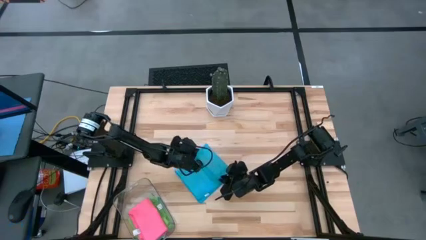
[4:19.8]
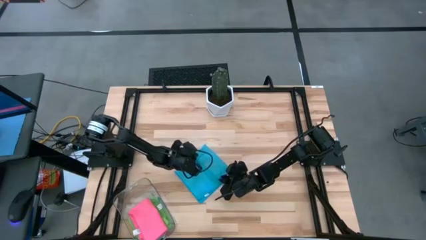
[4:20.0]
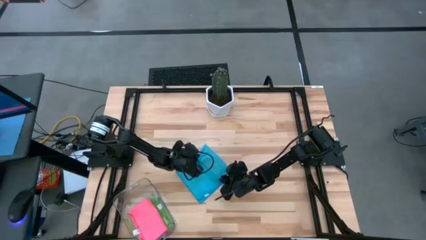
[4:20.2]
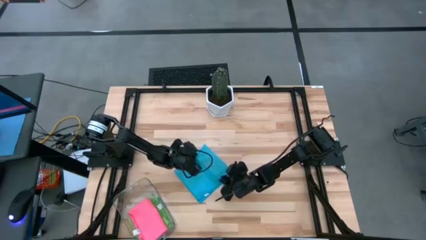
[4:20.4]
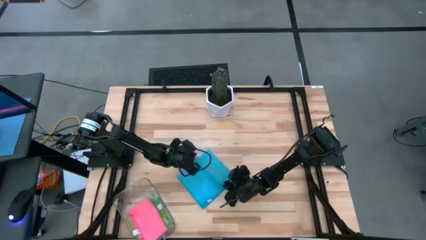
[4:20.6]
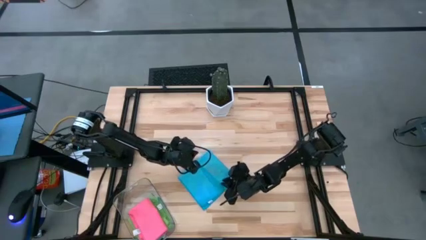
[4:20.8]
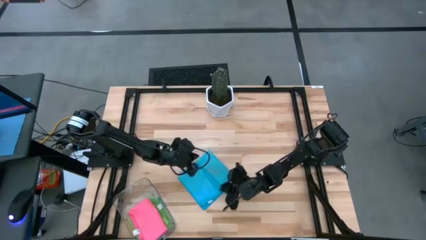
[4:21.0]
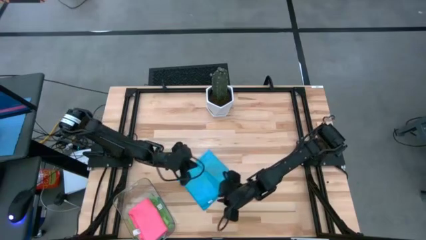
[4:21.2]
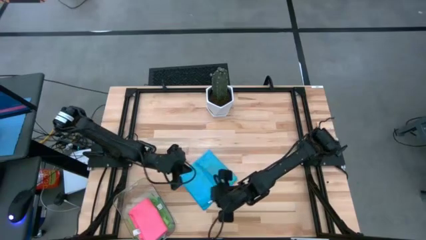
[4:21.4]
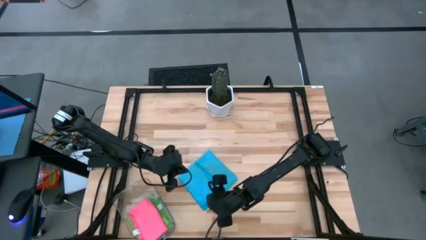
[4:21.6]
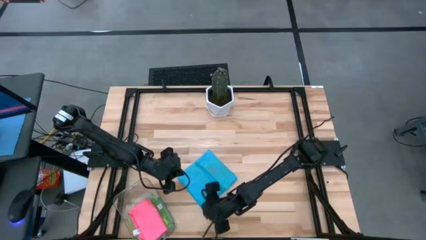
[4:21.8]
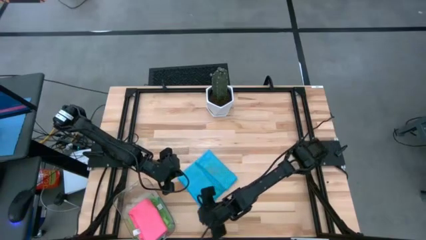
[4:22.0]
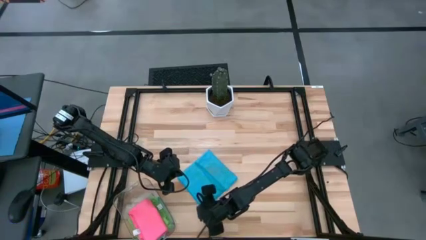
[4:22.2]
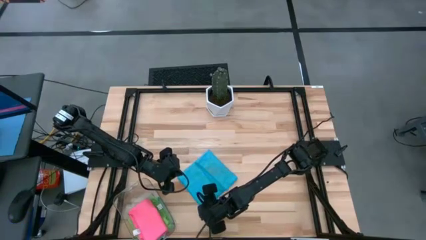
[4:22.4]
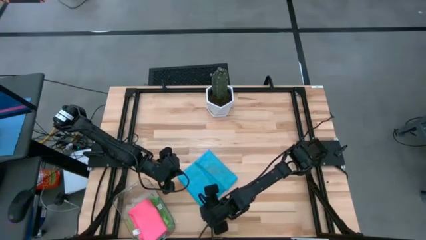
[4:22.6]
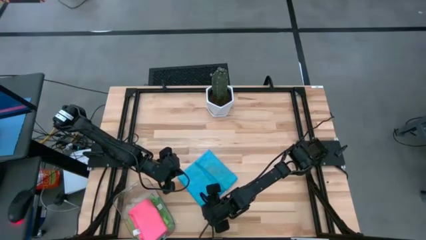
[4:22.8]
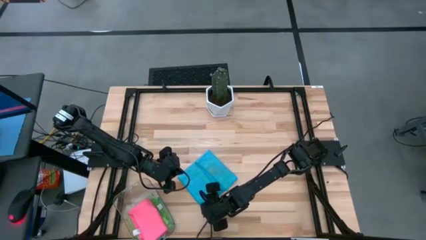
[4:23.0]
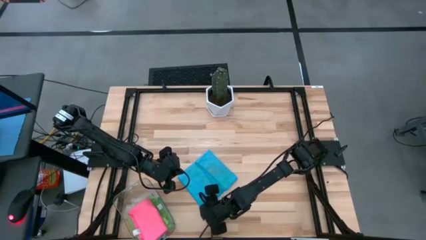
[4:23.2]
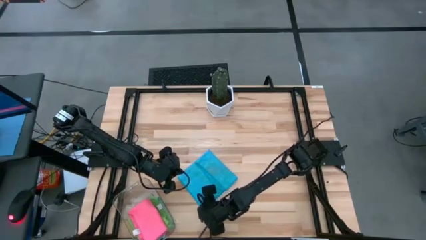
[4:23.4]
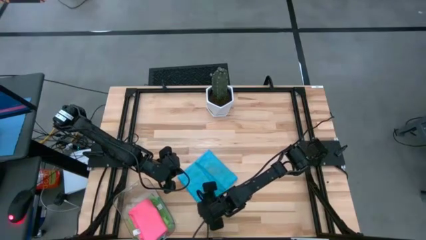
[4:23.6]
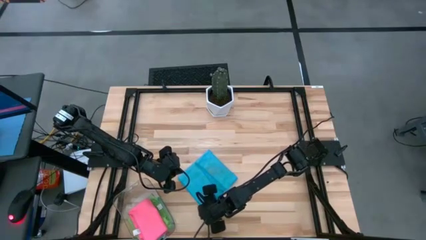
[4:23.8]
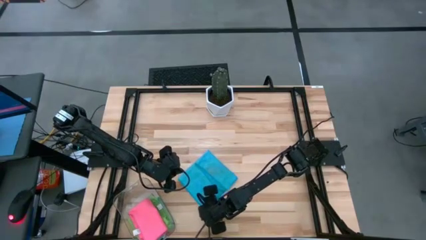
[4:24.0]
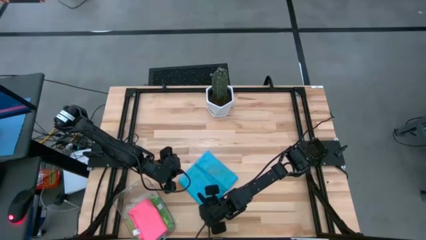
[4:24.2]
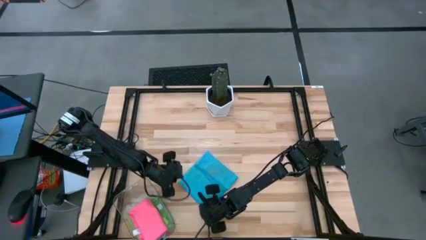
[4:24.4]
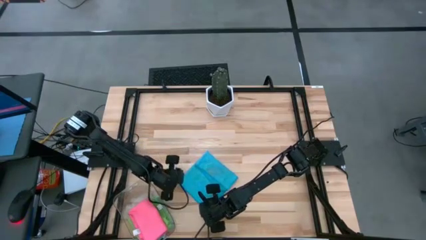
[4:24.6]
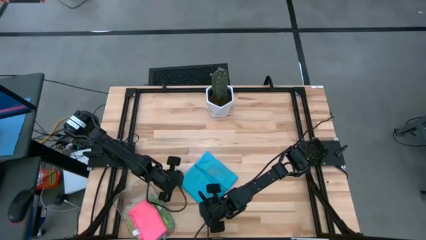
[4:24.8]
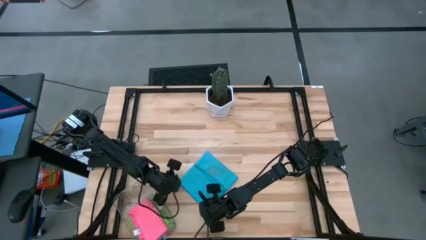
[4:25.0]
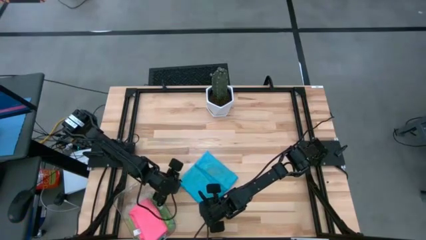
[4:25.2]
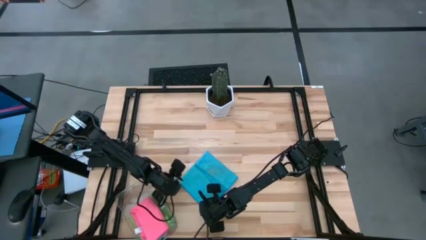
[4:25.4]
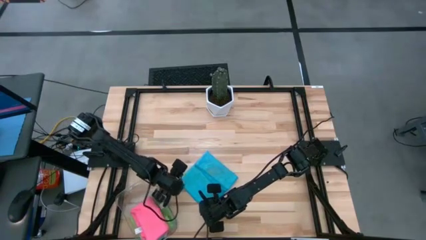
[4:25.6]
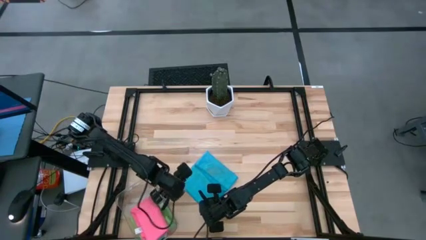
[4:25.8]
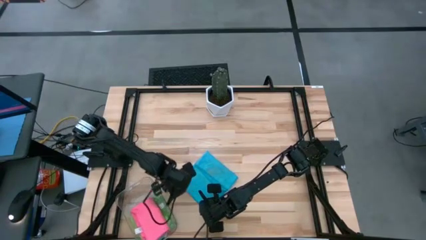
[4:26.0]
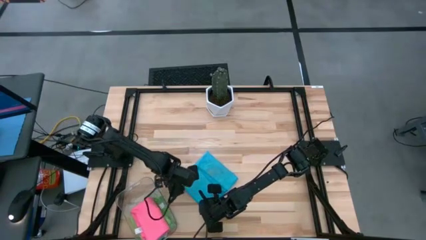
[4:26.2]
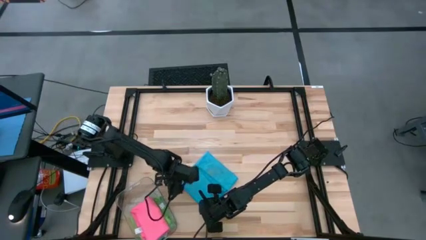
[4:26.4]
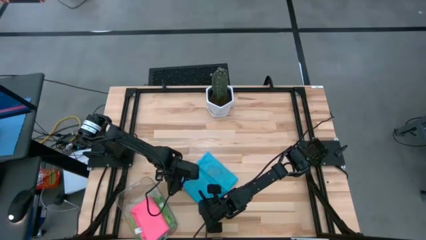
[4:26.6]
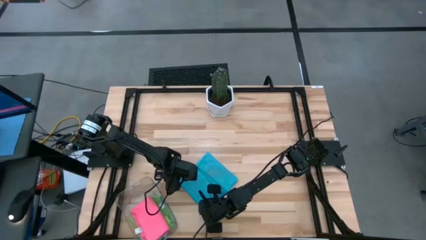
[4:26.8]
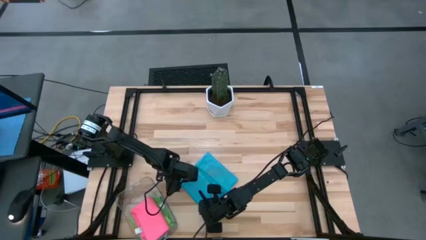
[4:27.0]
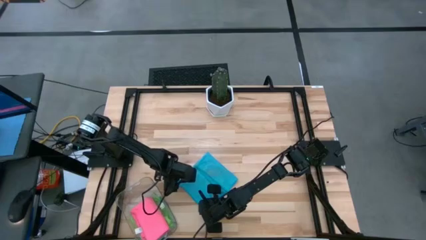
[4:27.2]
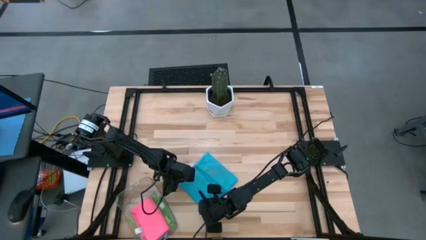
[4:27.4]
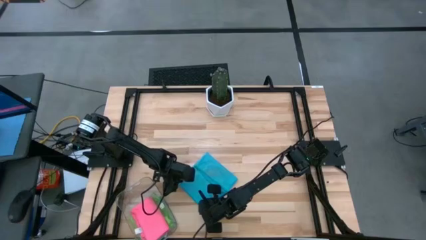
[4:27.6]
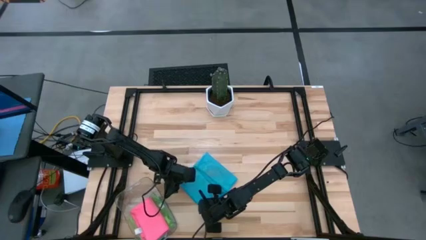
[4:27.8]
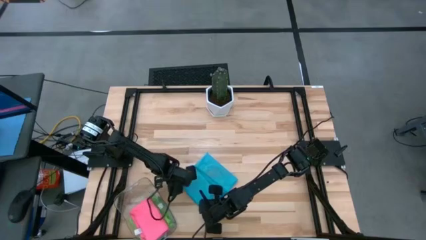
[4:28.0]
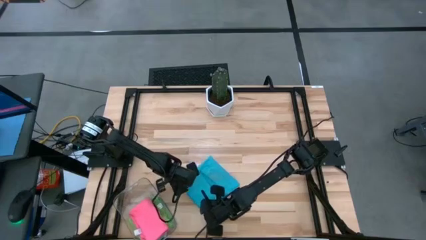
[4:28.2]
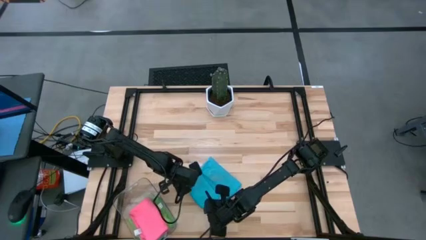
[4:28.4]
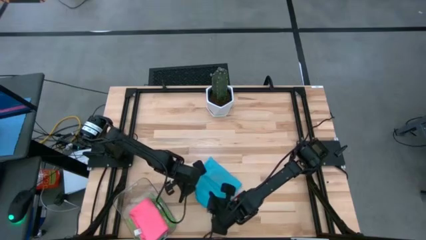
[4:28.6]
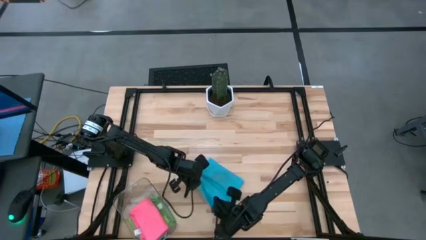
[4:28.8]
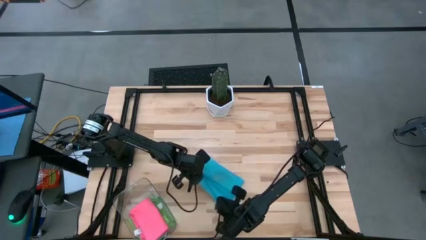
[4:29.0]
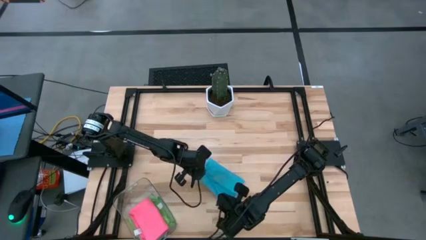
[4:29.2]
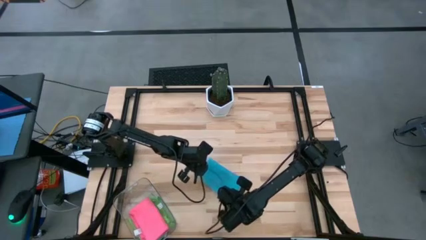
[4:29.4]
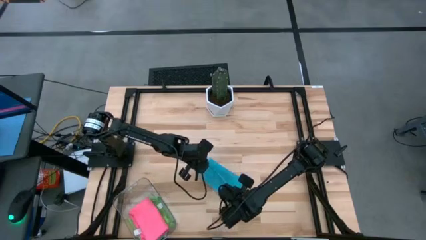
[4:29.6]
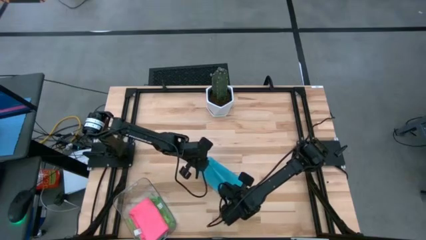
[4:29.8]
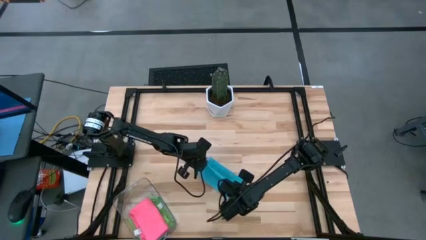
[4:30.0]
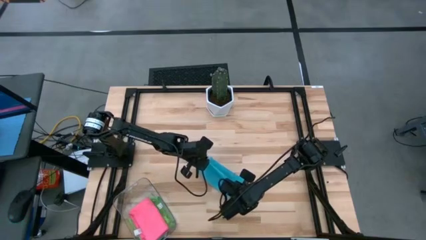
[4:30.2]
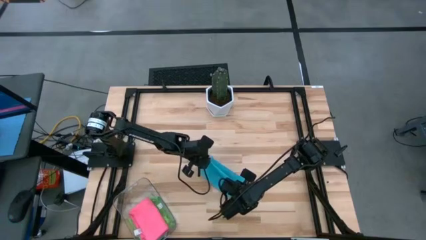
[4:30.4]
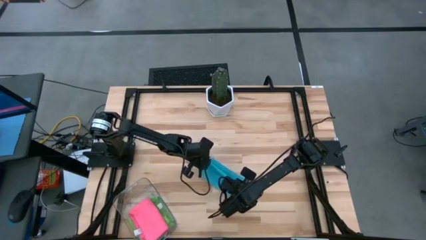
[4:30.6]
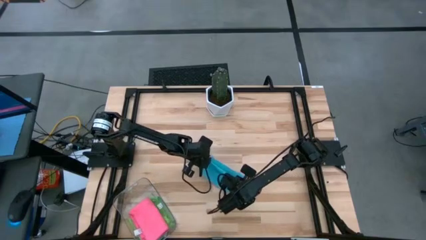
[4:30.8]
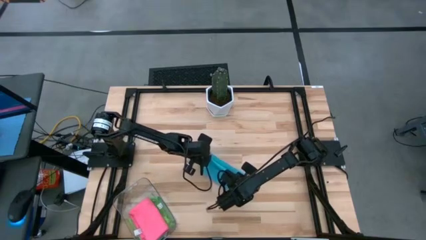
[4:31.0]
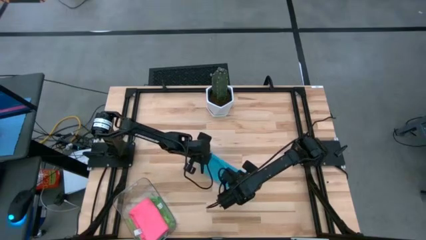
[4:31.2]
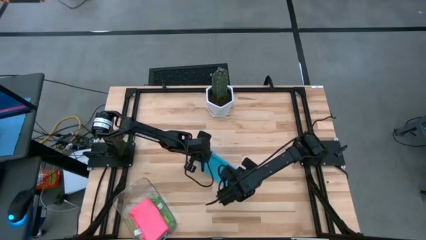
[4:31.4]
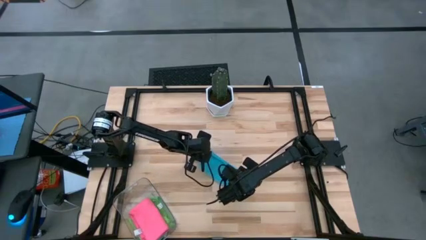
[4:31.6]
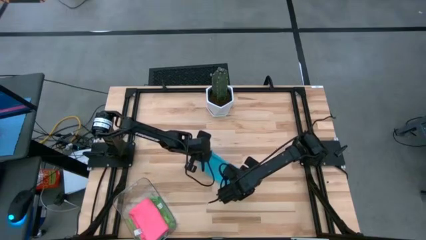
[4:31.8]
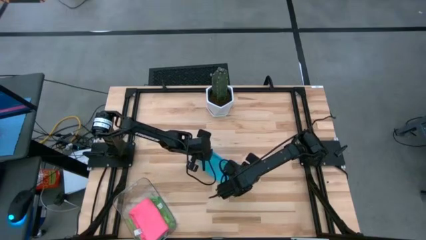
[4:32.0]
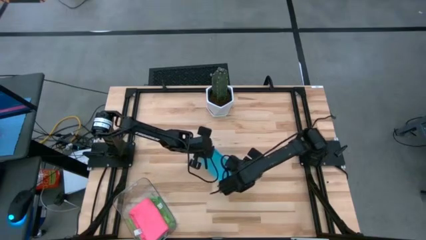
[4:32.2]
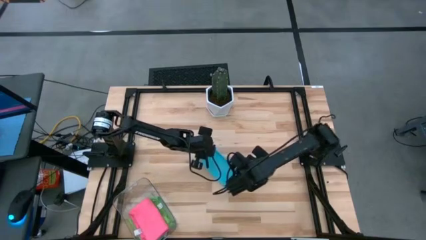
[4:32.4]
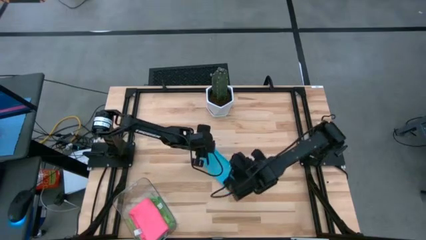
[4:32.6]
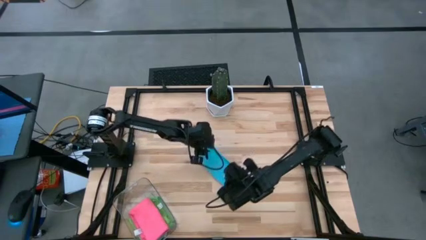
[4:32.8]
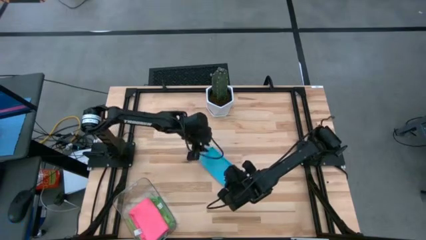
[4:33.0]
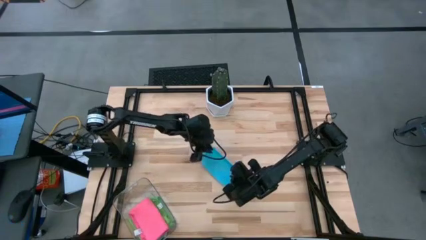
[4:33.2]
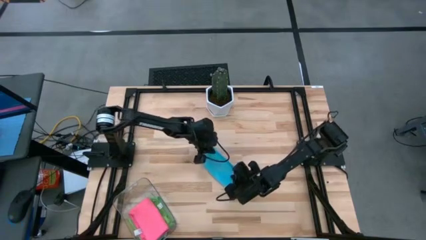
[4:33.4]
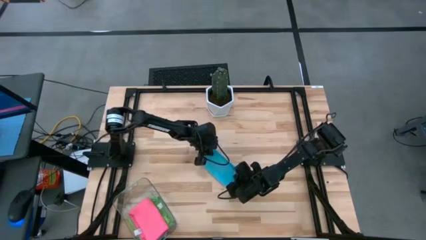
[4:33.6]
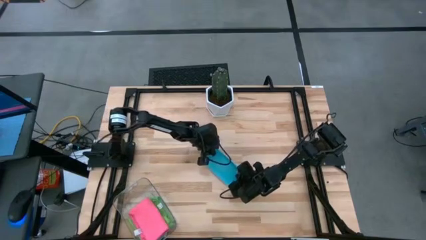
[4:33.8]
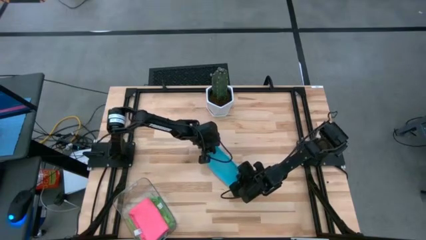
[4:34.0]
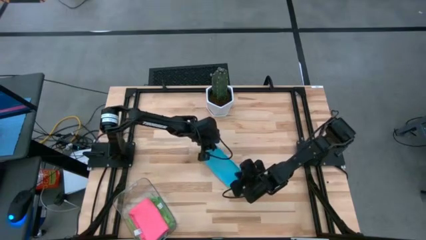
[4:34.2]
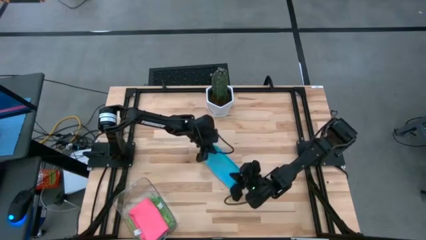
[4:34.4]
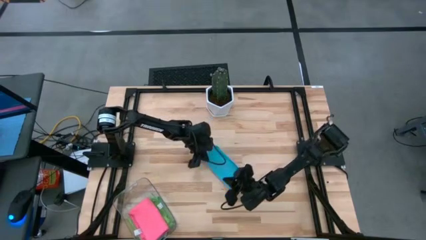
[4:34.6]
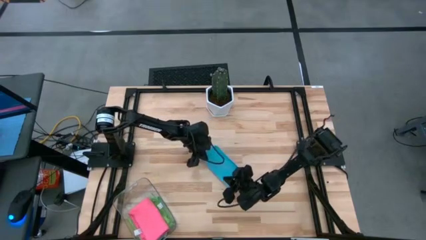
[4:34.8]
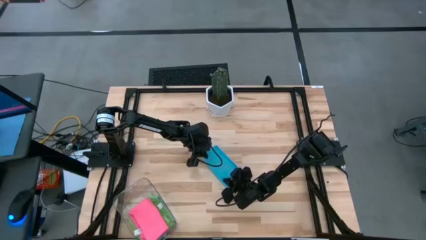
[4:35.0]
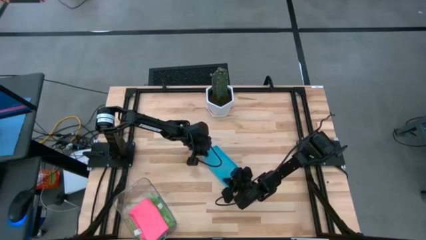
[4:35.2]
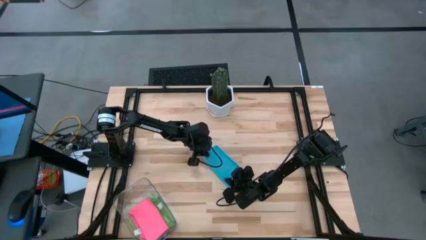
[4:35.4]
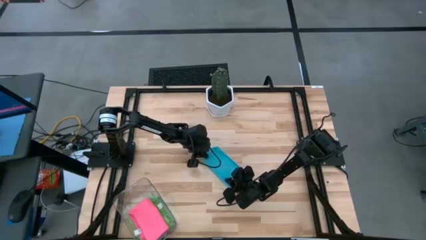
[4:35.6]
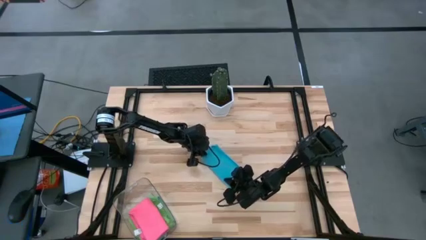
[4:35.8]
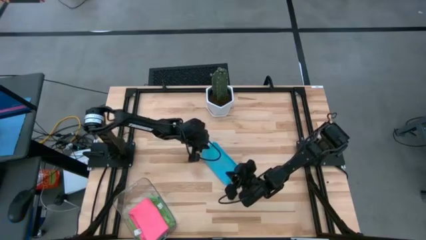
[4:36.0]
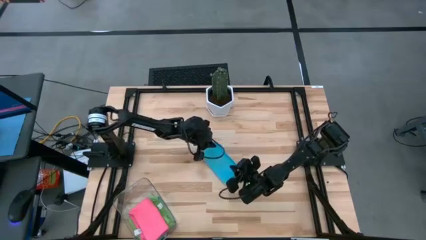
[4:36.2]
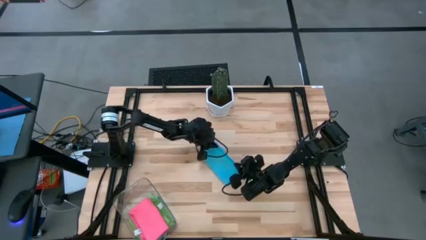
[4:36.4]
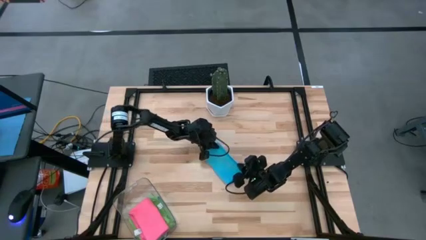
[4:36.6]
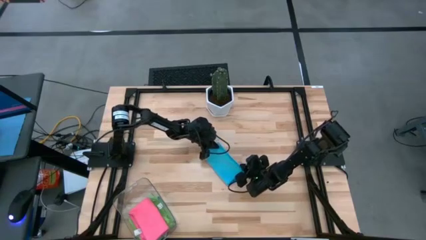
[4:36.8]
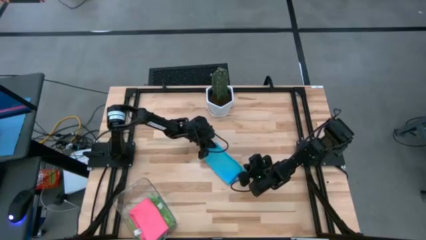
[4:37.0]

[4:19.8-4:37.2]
Task: Fold microfiber towels
Fold the blue microfiber towel
